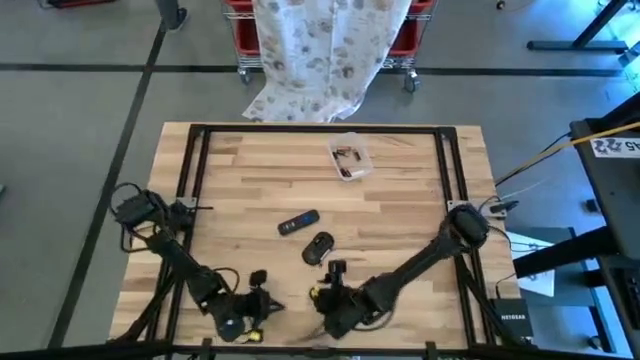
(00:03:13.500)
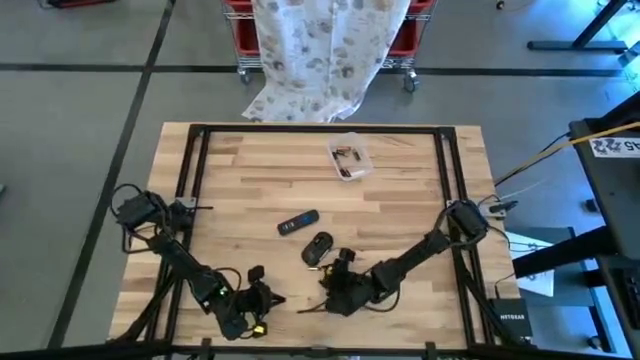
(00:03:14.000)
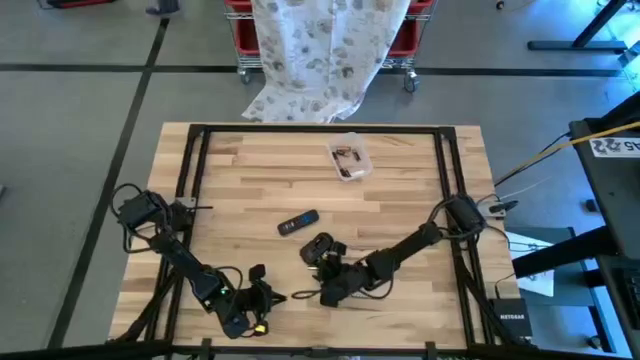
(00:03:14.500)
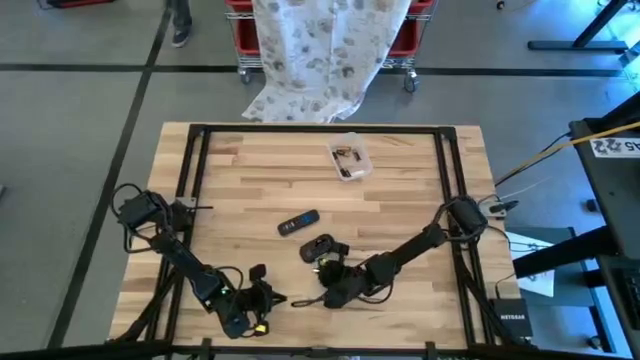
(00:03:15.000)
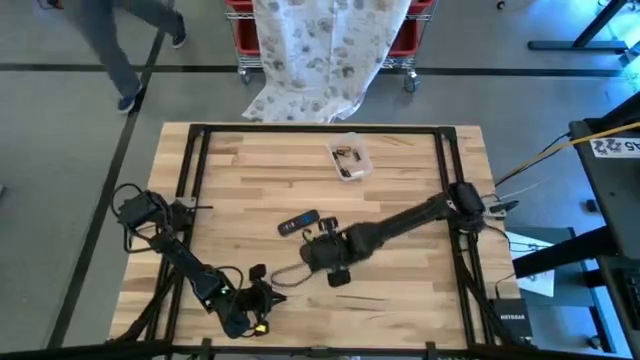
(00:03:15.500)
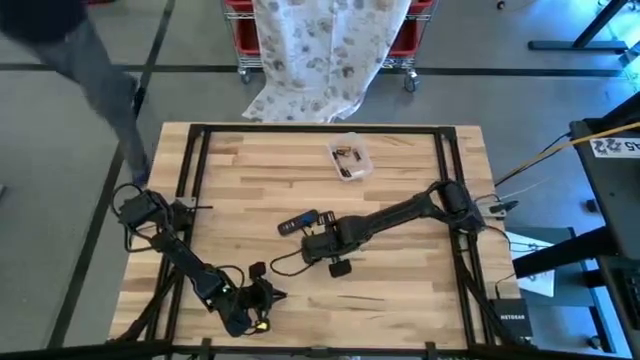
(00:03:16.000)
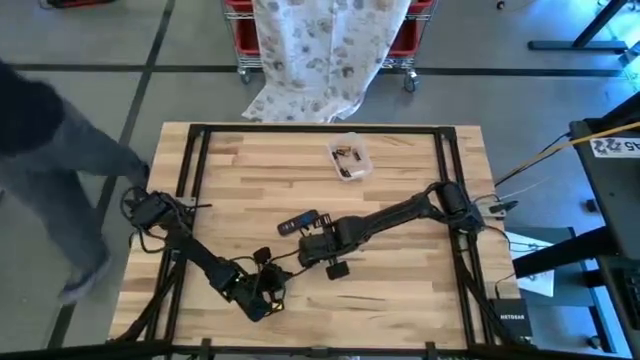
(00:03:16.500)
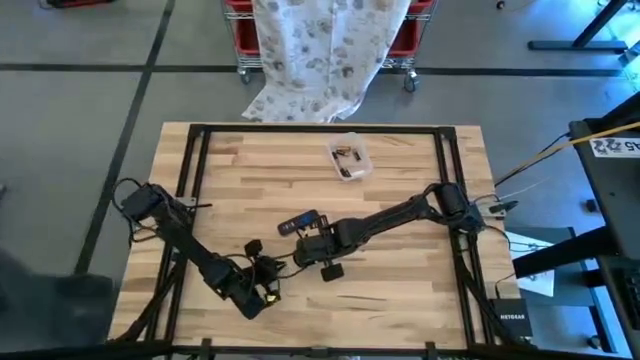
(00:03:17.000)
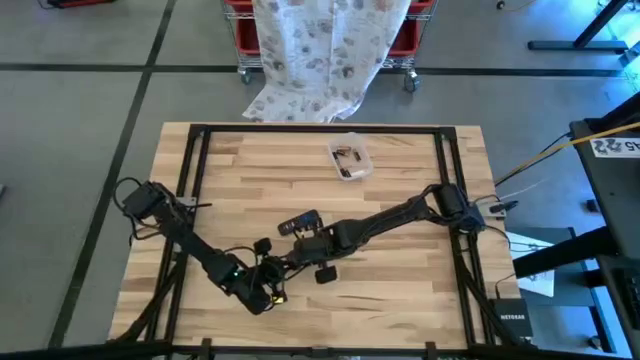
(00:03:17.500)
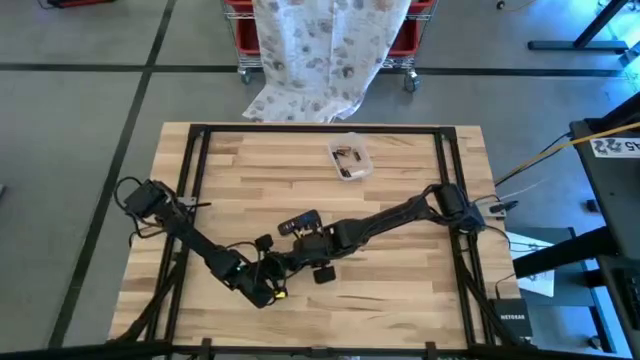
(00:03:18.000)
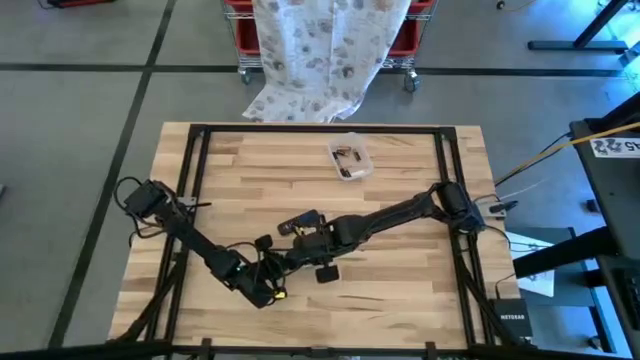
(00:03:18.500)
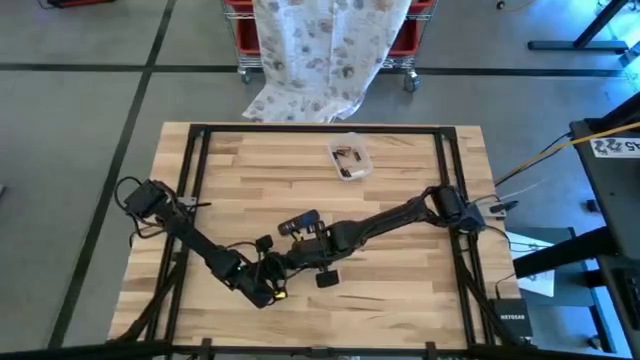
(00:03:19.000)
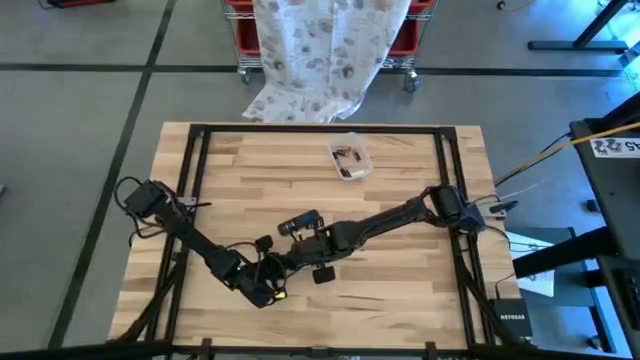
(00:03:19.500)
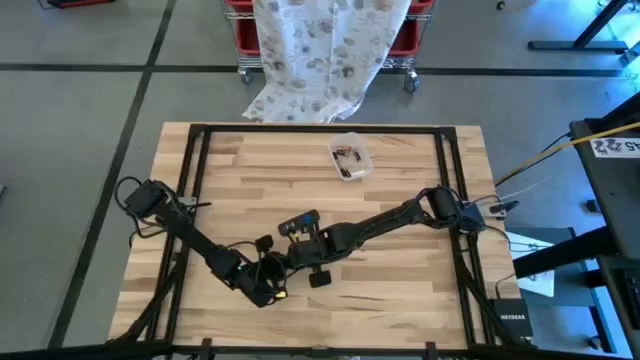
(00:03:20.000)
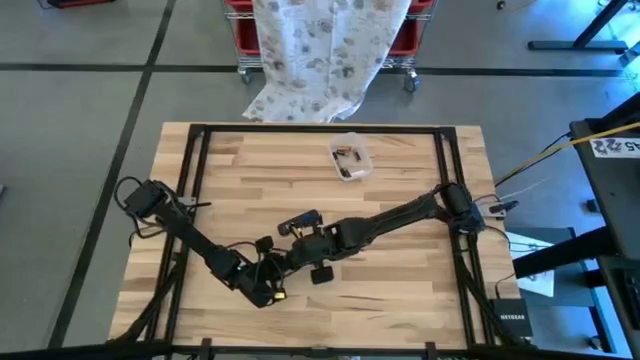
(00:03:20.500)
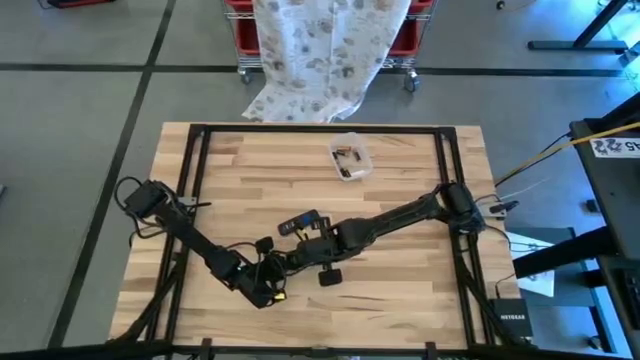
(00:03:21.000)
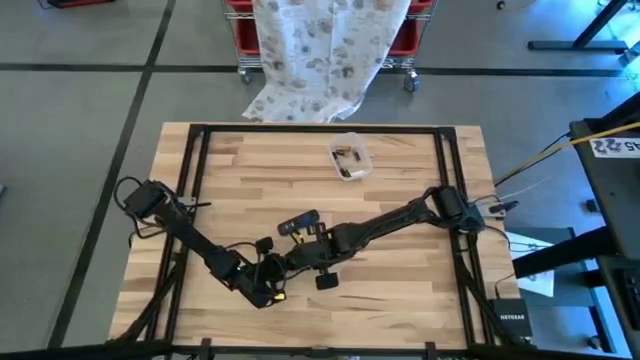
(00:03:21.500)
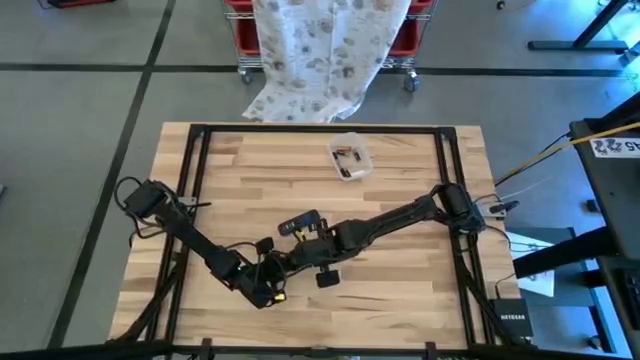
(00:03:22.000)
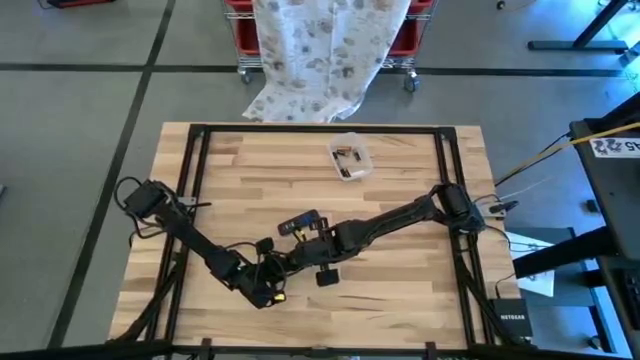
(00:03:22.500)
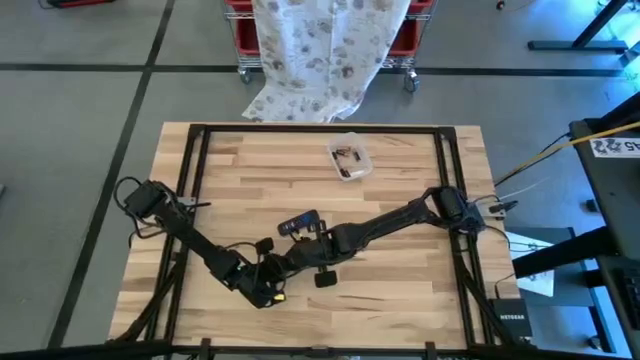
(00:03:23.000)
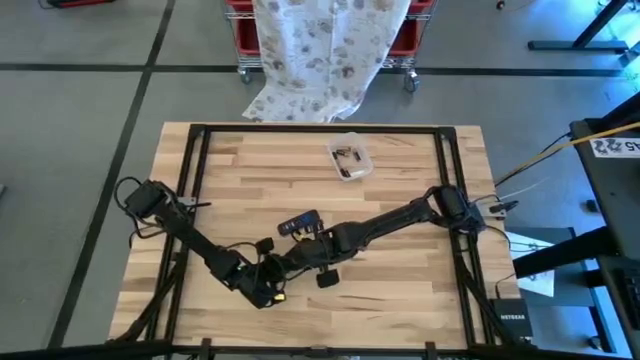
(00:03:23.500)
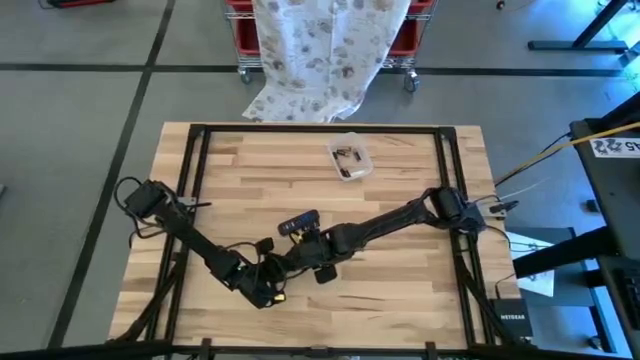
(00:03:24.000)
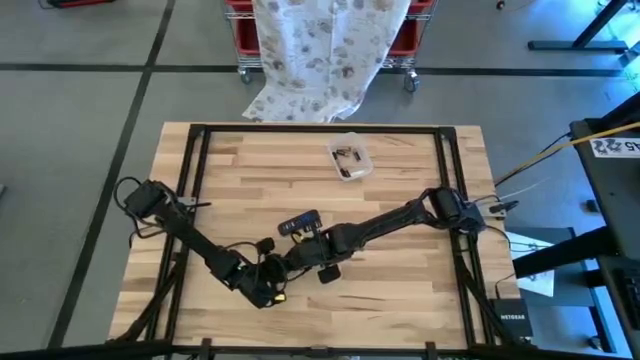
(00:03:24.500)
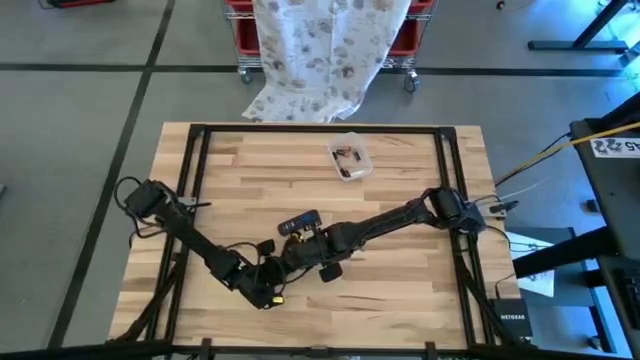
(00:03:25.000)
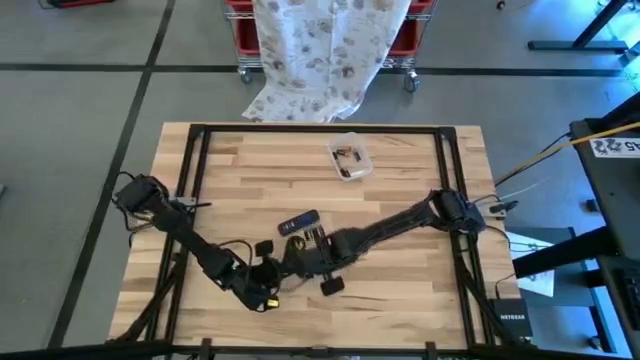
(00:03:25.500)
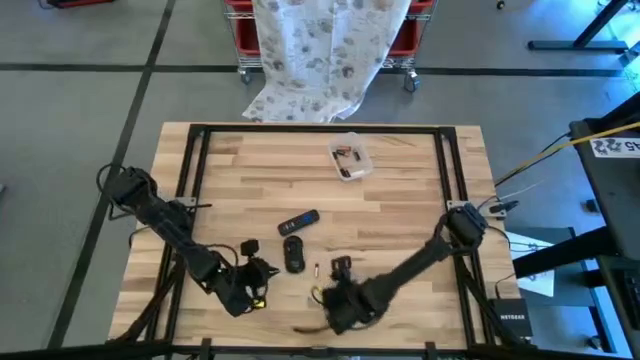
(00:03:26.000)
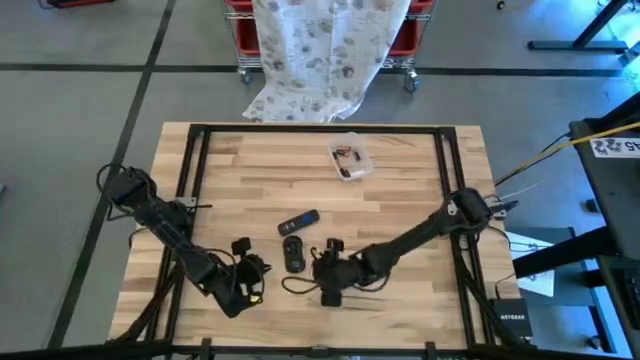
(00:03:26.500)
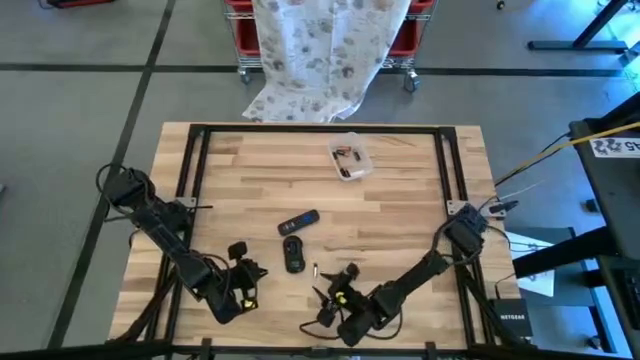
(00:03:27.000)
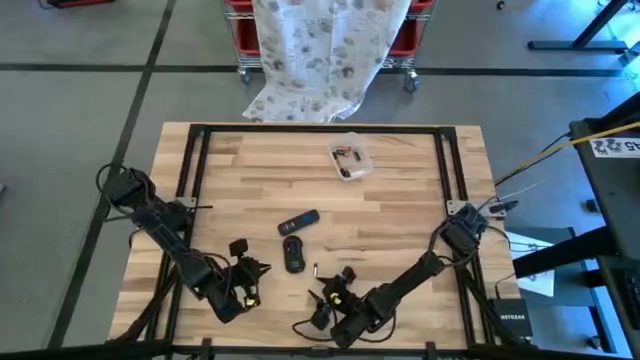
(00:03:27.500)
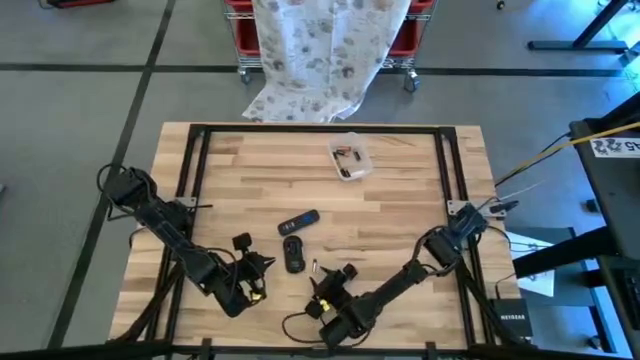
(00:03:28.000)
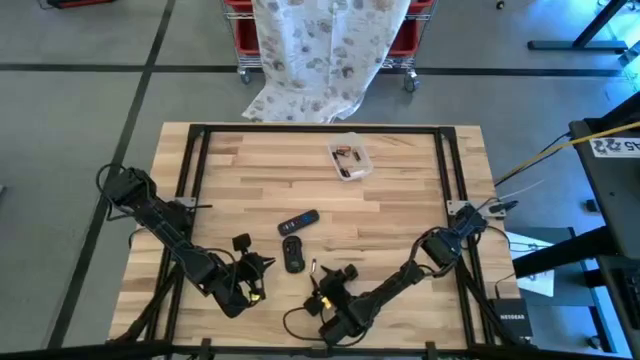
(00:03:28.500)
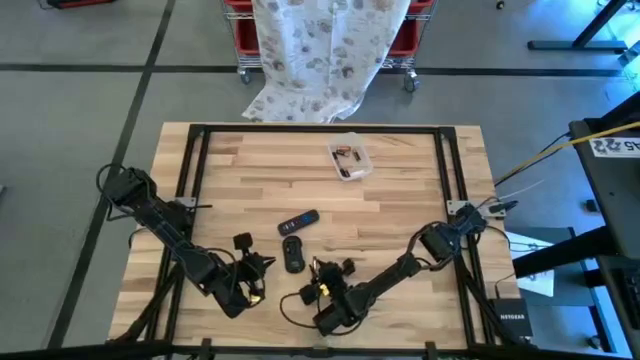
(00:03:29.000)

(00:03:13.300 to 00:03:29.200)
Task: Insert battery
Insert the white battery into the wireless mouse

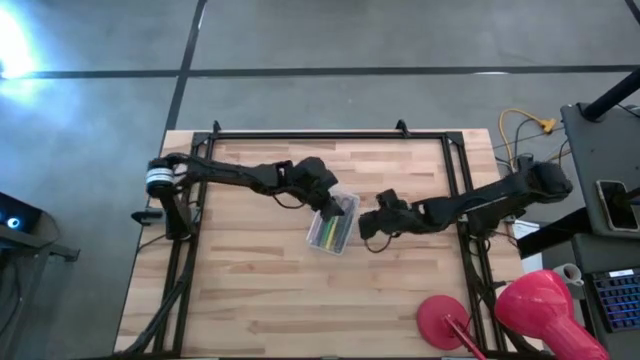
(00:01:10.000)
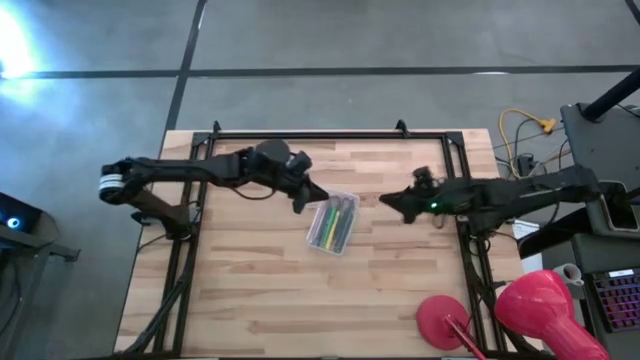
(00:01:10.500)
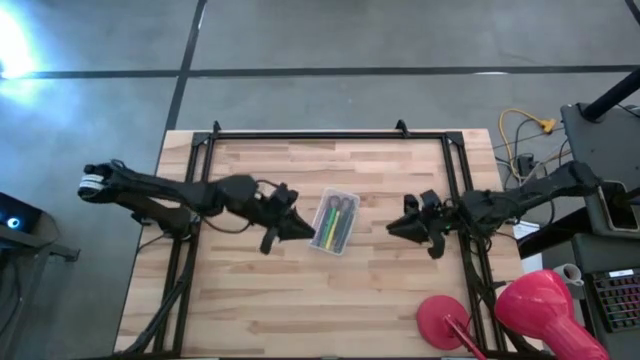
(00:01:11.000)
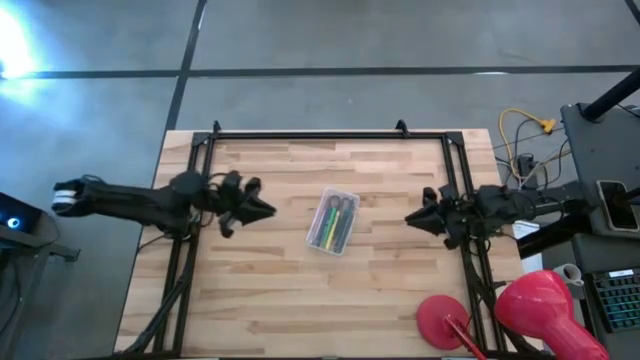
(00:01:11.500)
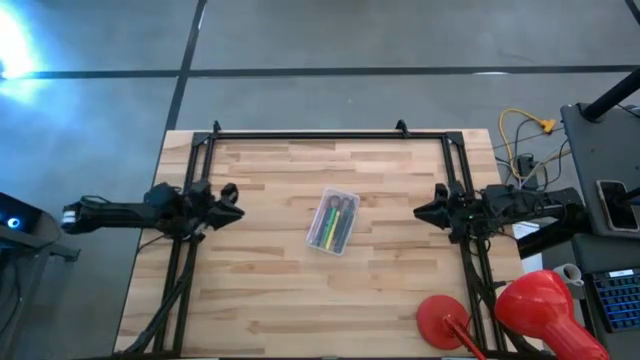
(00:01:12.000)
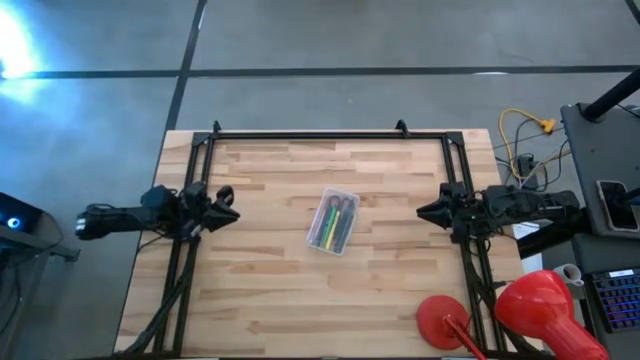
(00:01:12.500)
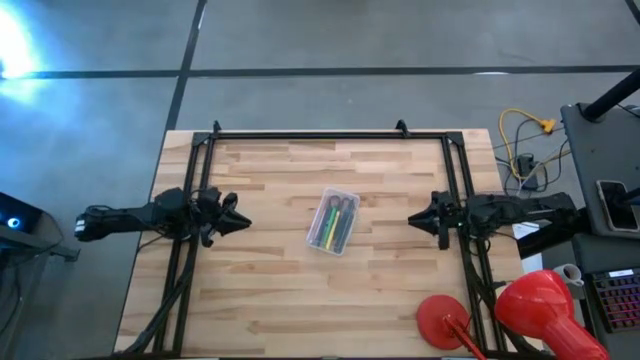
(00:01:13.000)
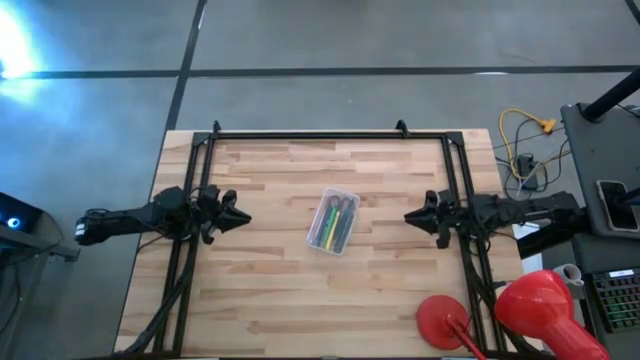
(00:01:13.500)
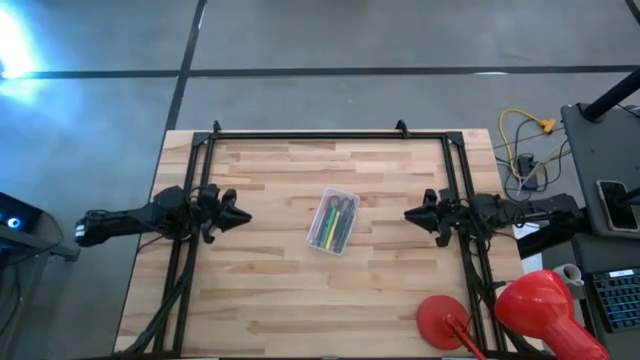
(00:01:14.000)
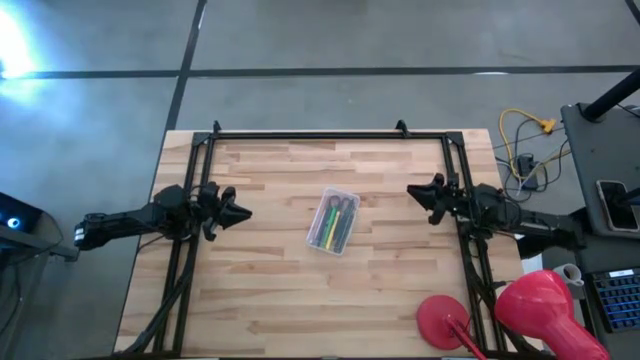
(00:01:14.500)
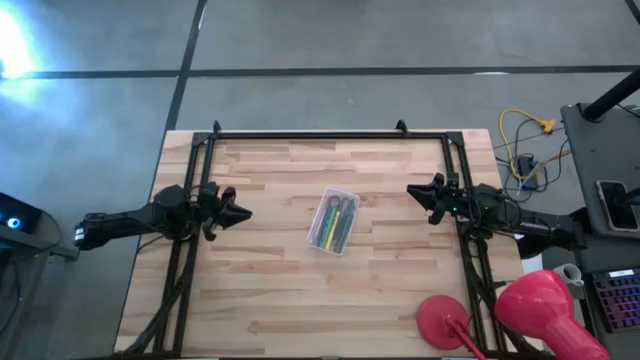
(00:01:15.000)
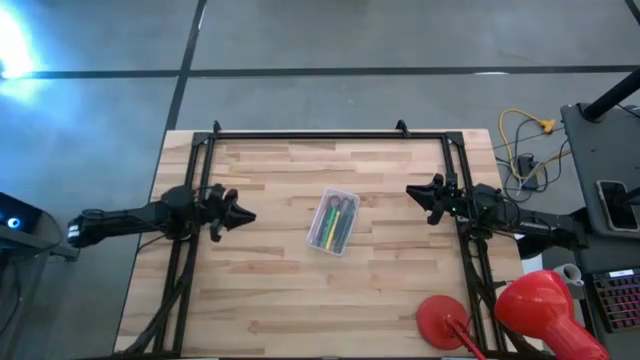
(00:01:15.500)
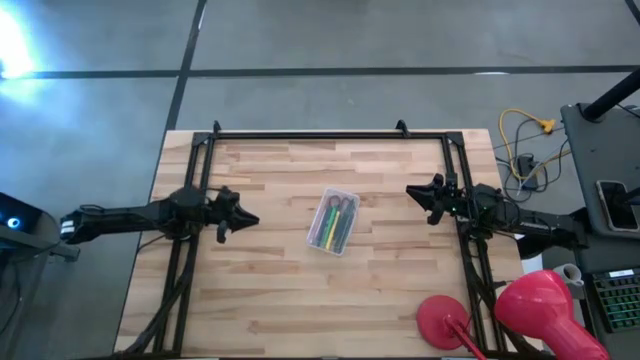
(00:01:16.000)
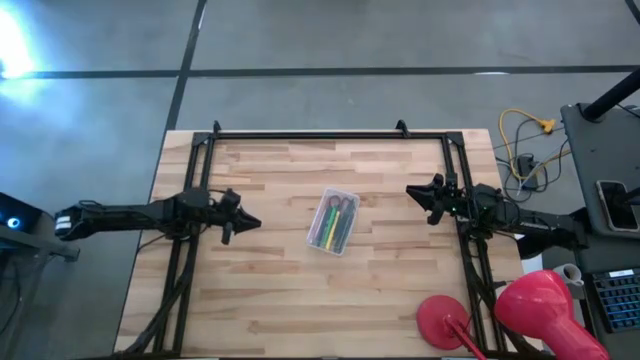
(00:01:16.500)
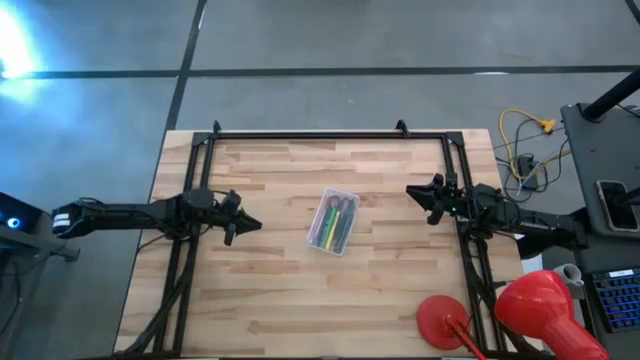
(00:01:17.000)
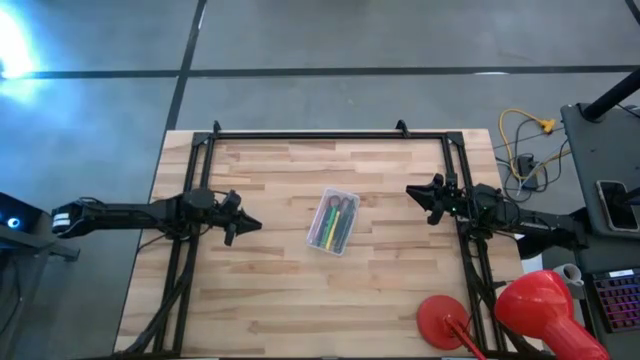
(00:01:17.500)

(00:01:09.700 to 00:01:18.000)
Task: Pick & place school supplies into a supply box
Return to Home Position
